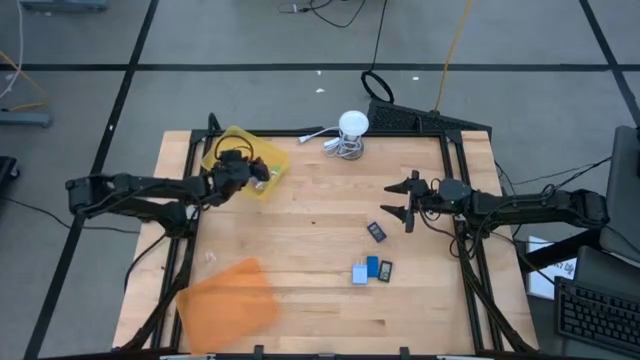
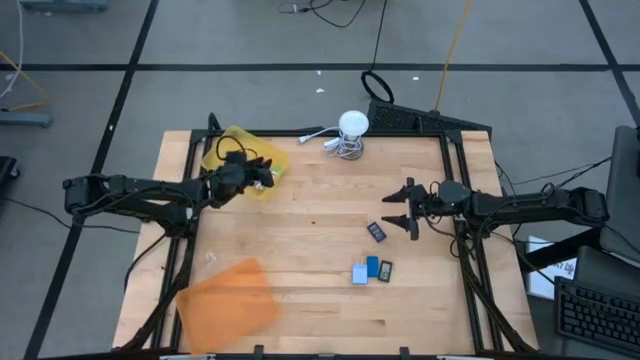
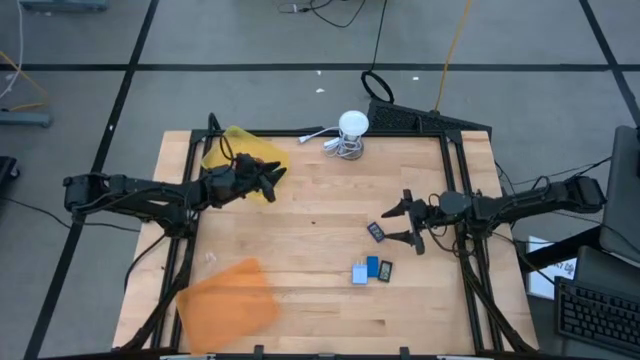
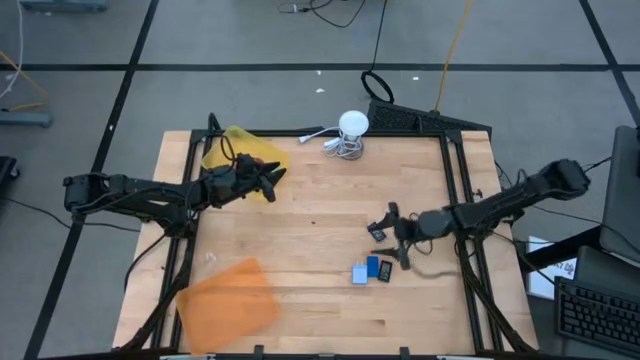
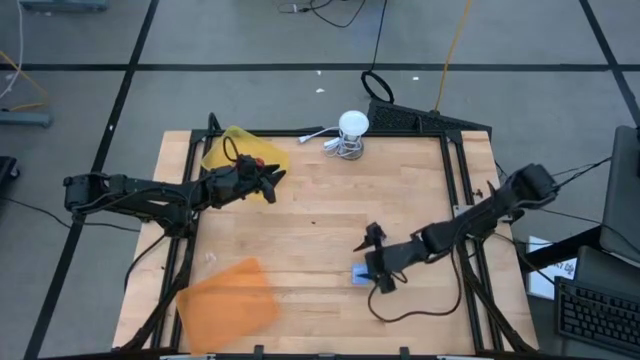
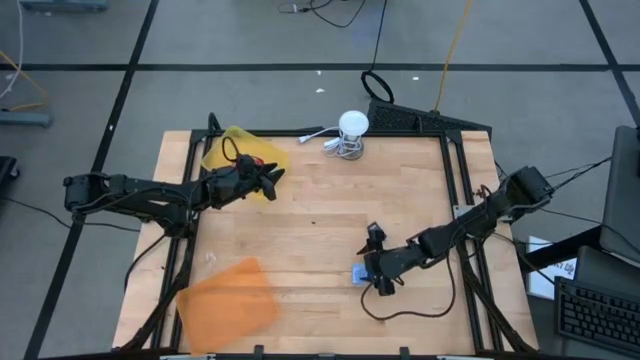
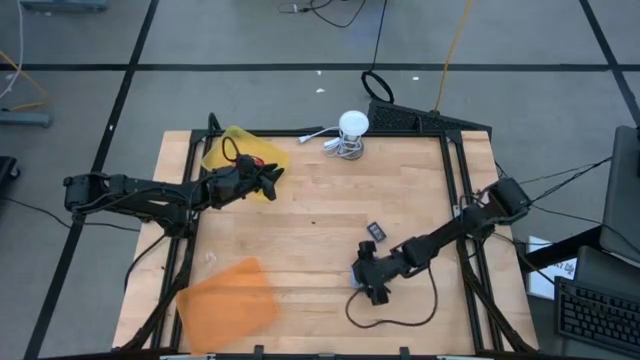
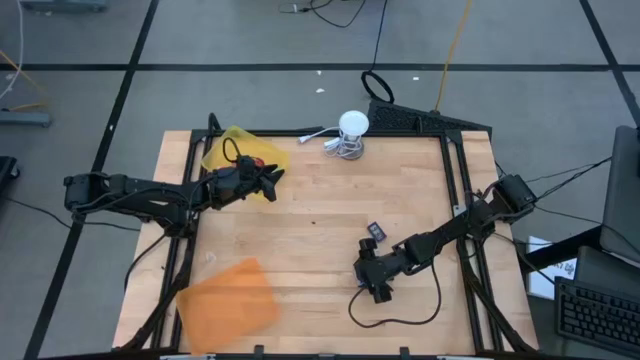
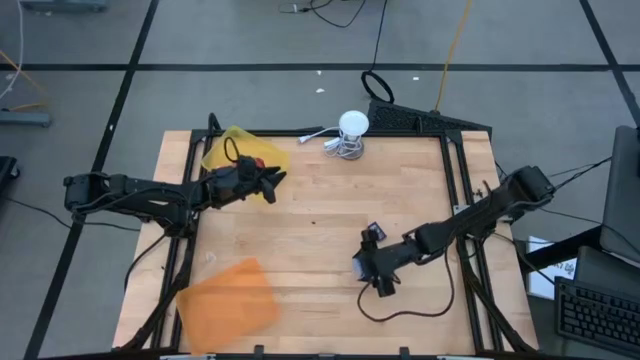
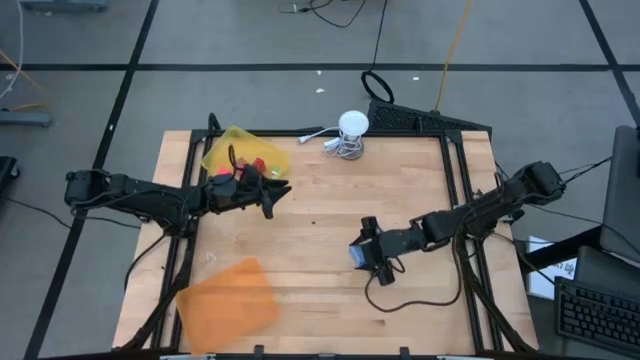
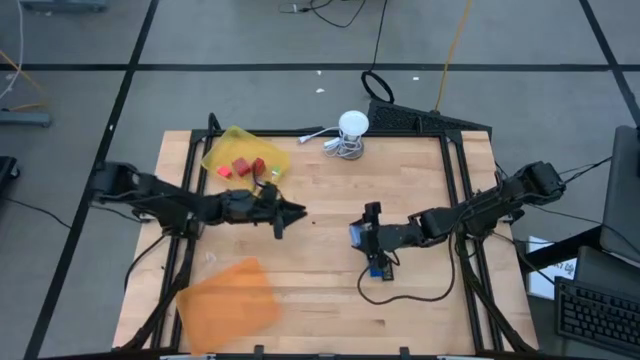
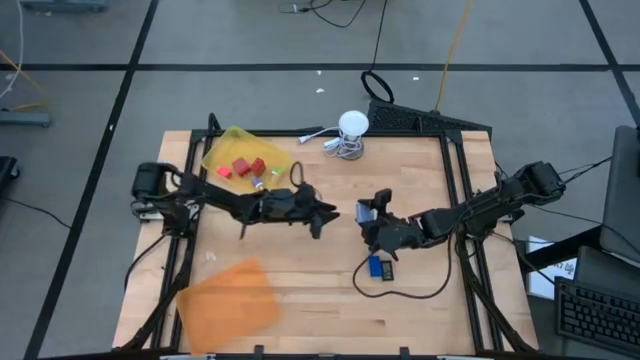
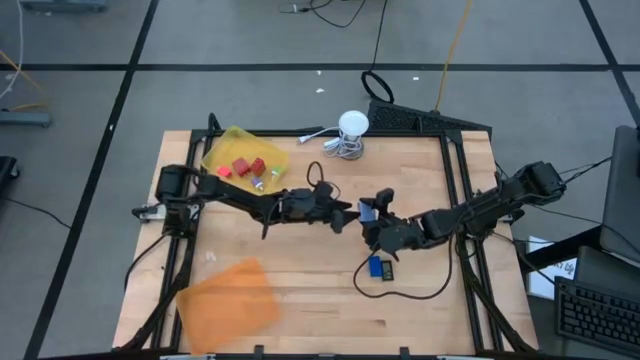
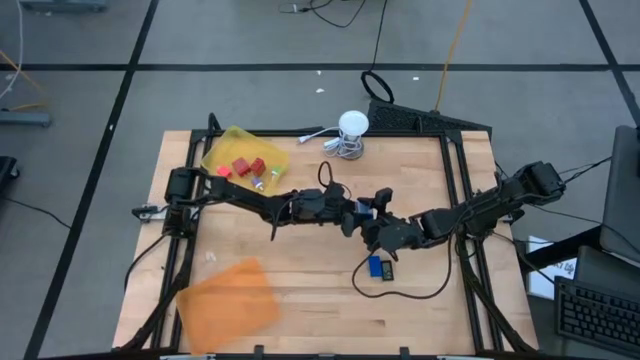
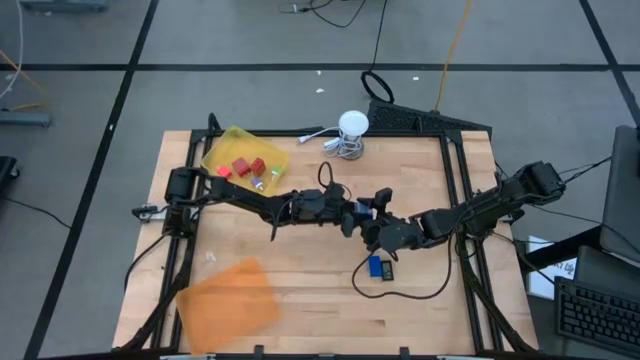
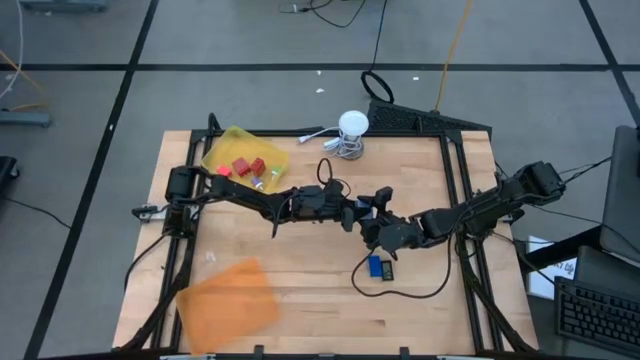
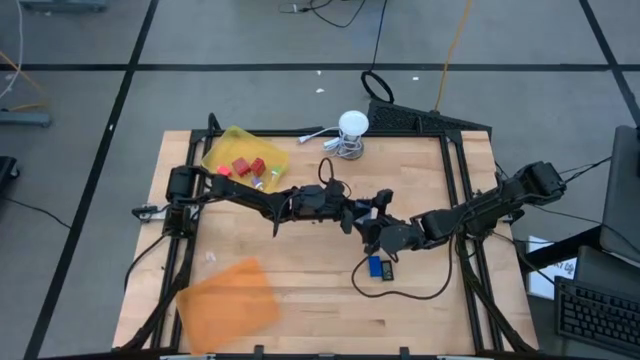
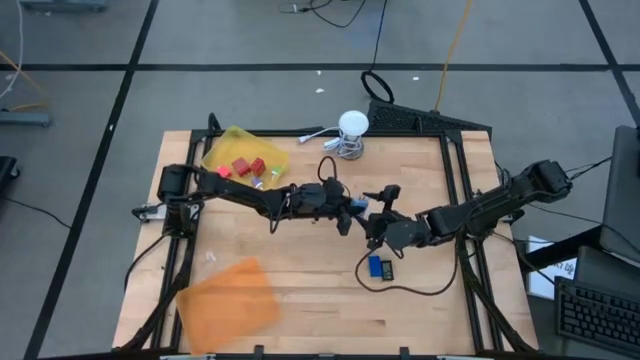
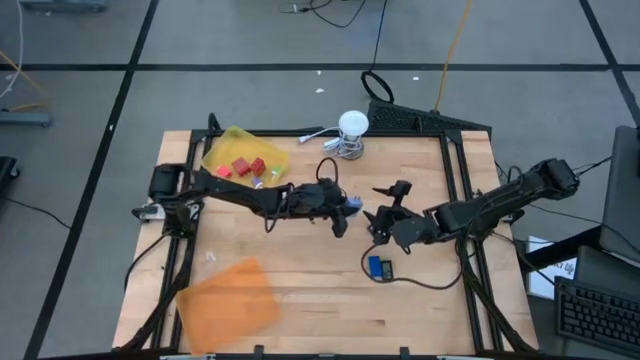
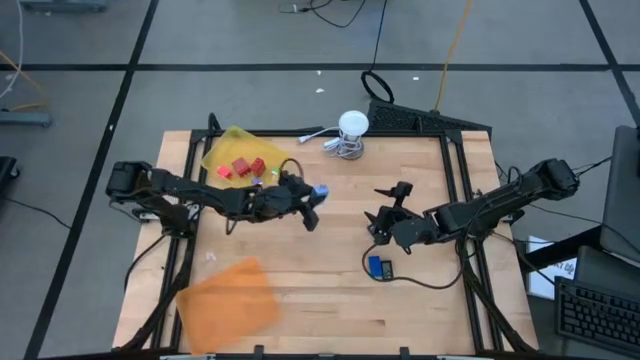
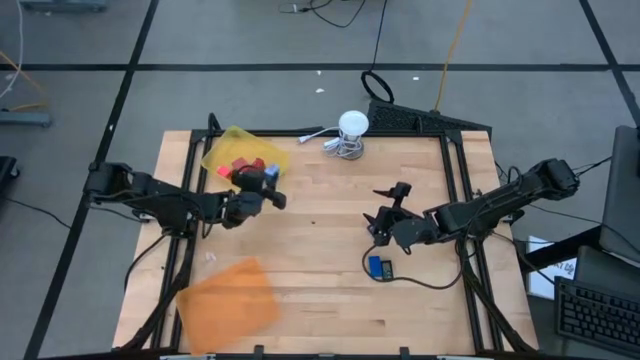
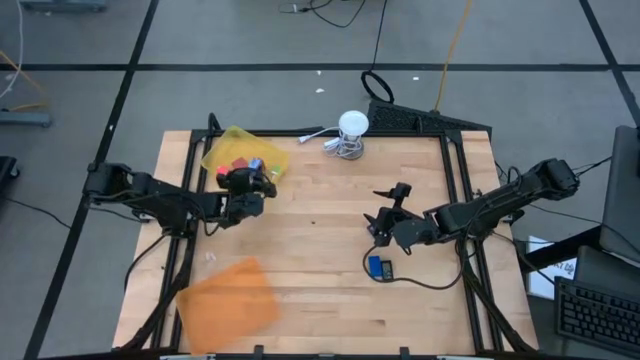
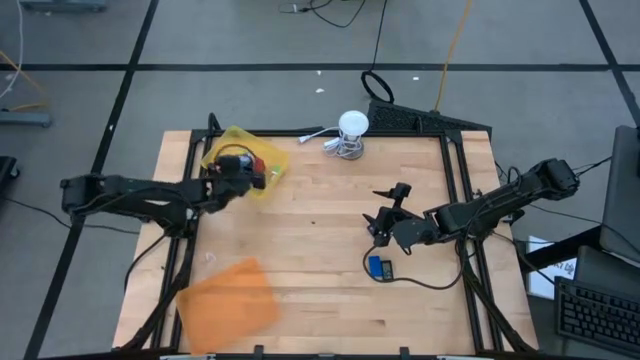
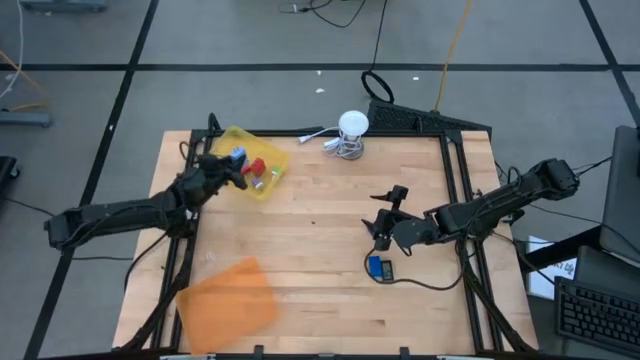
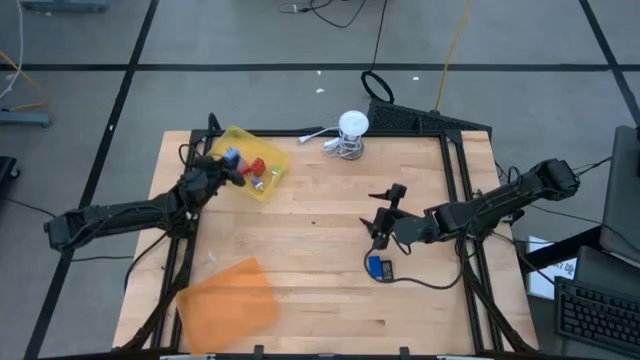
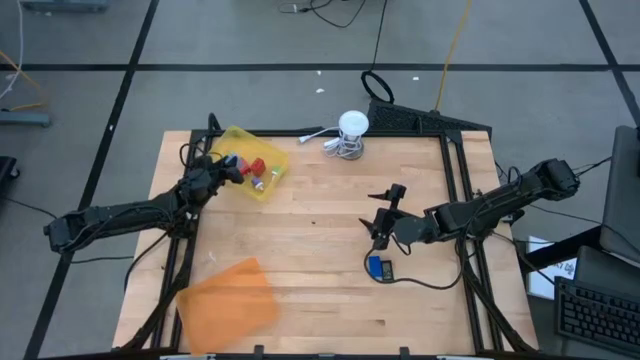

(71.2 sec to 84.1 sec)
Task: Pick & Place Office items
Put the light blue charger adapter into the yellow bin

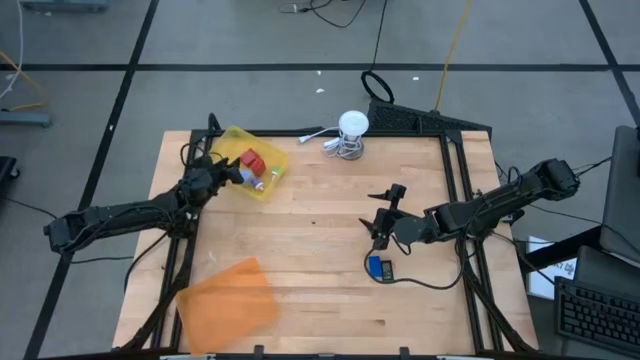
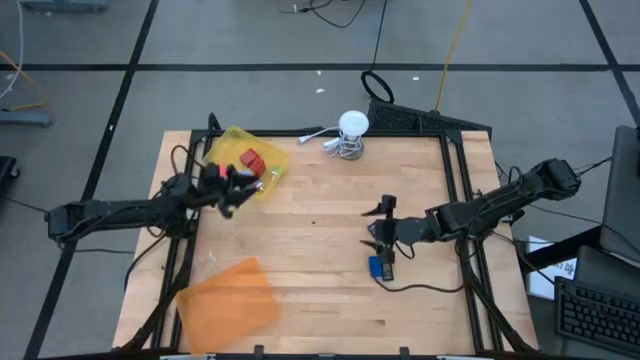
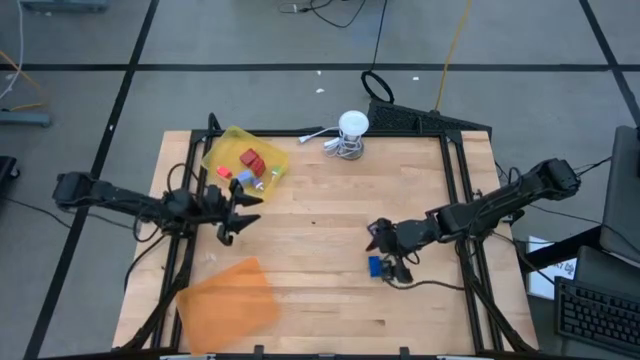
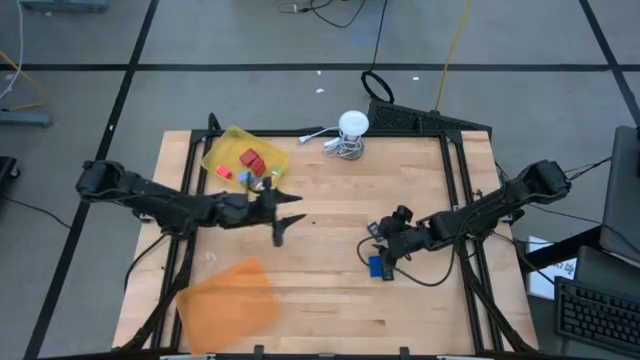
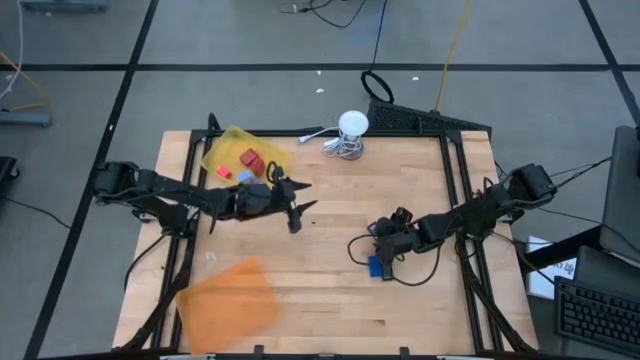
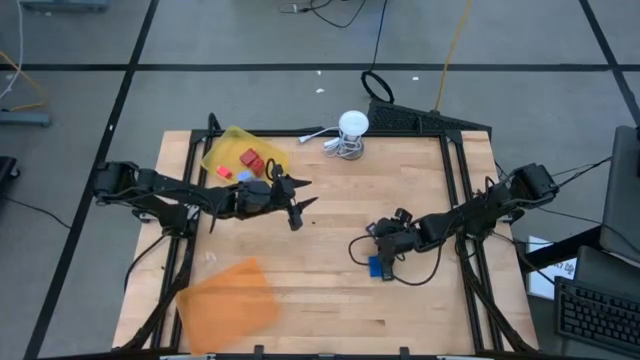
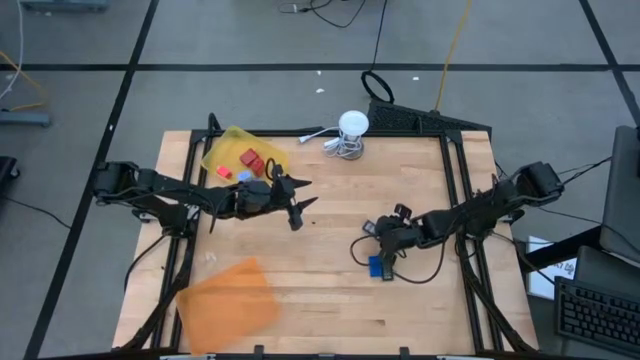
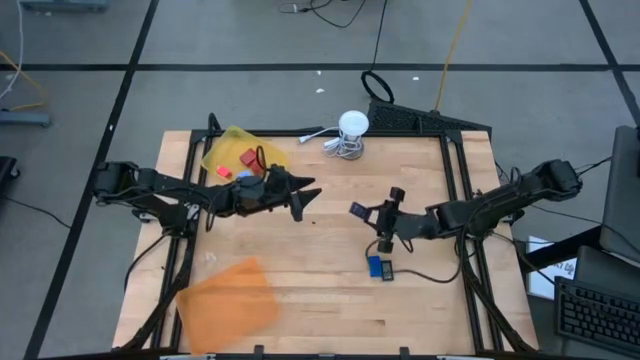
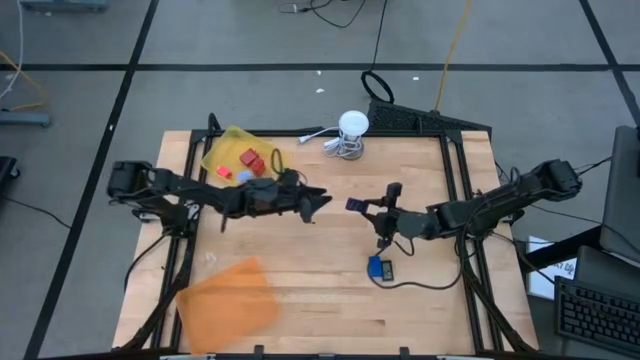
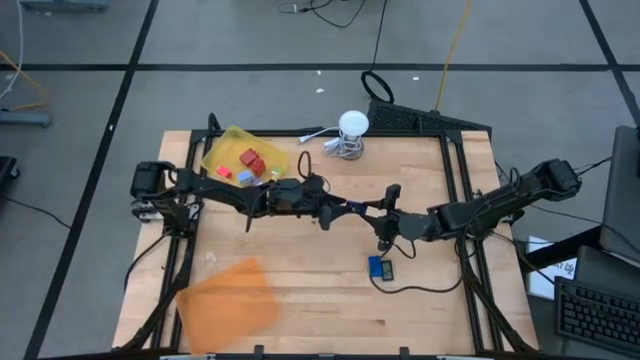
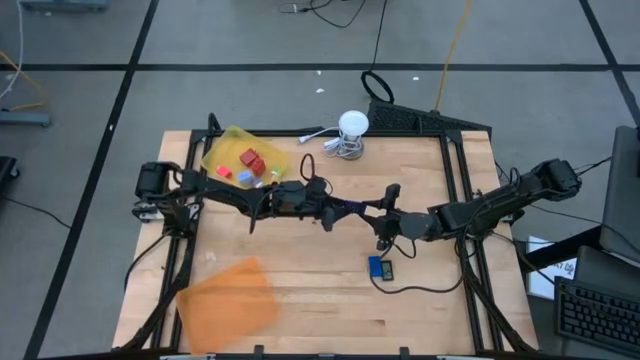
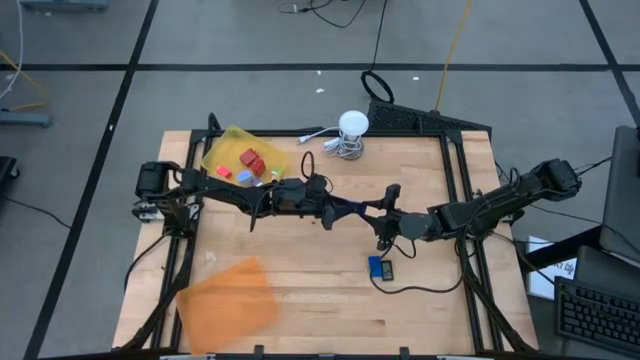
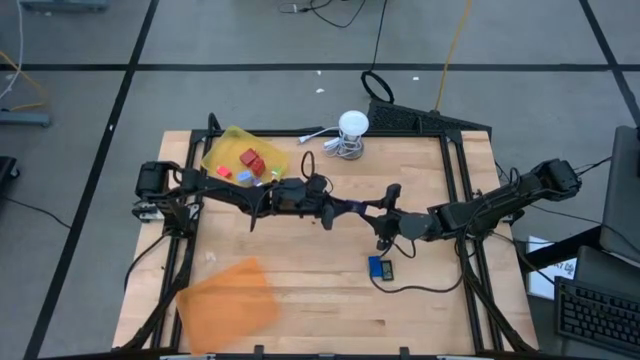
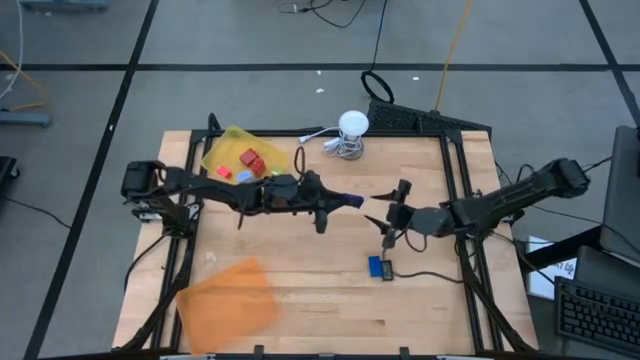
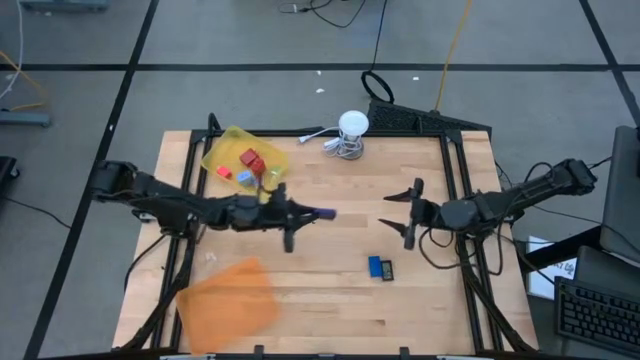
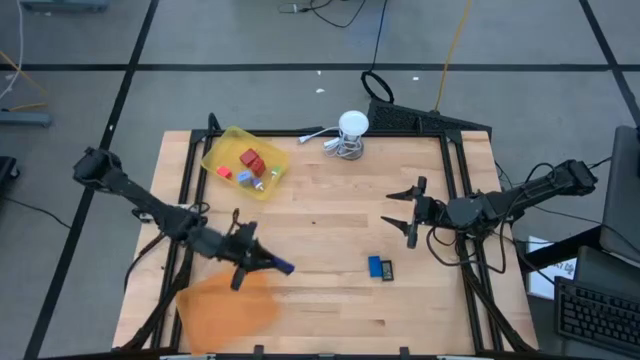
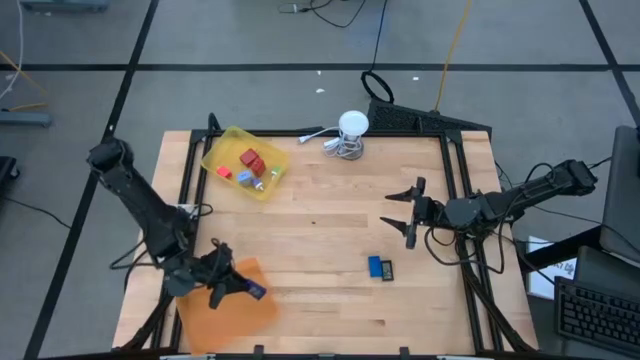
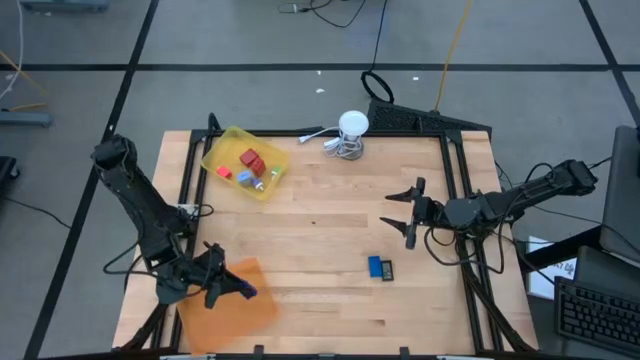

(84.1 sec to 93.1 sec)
Put the dark blue digital timer into the orange bin
